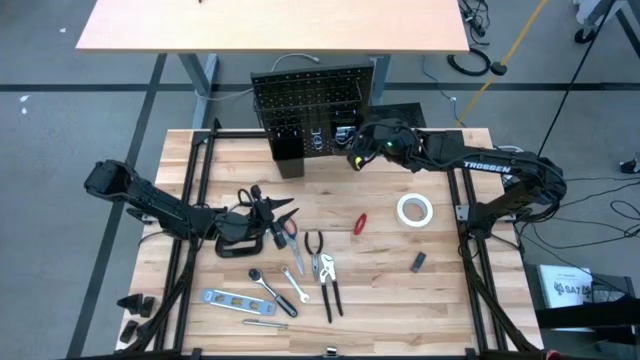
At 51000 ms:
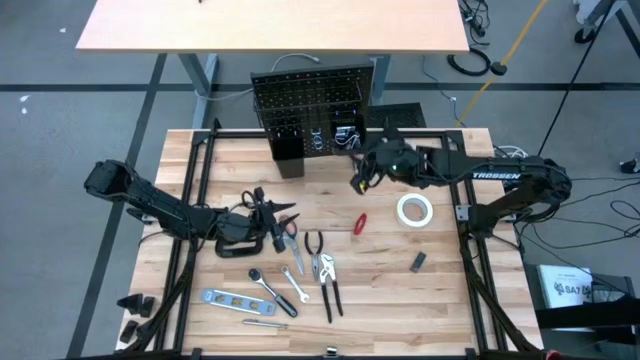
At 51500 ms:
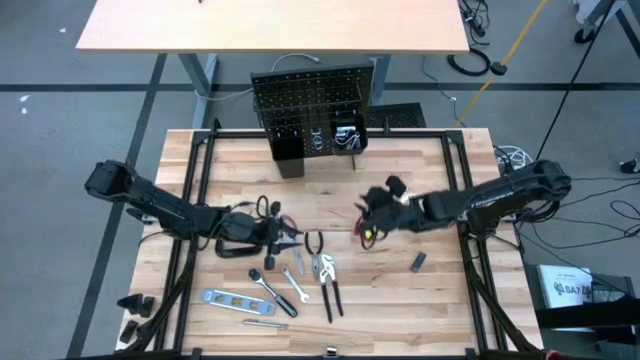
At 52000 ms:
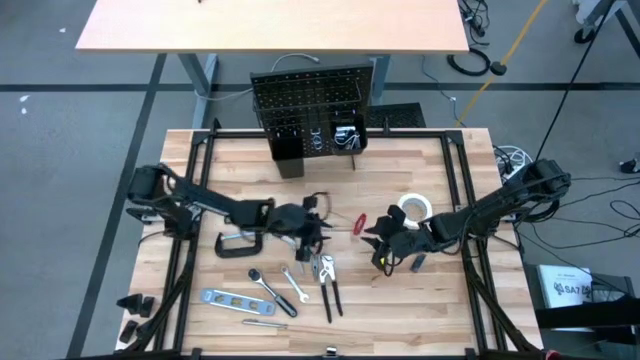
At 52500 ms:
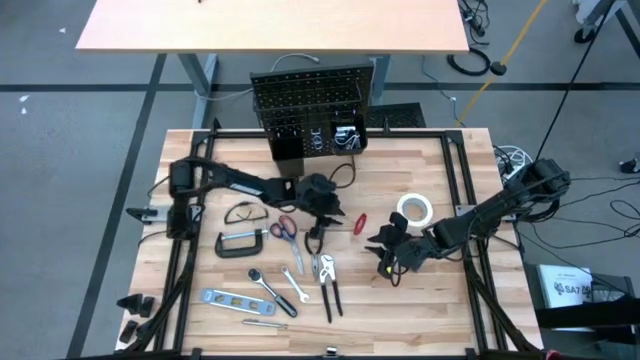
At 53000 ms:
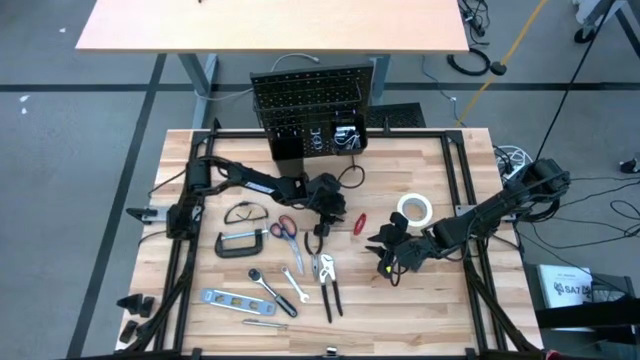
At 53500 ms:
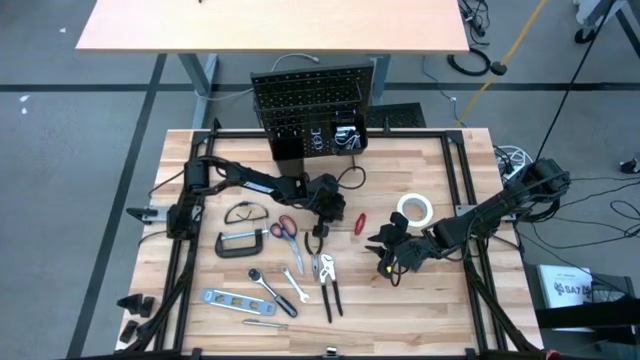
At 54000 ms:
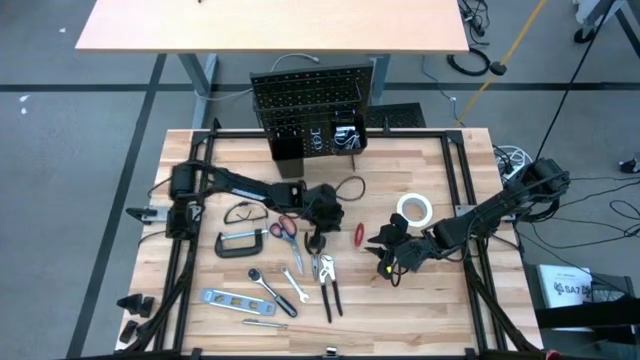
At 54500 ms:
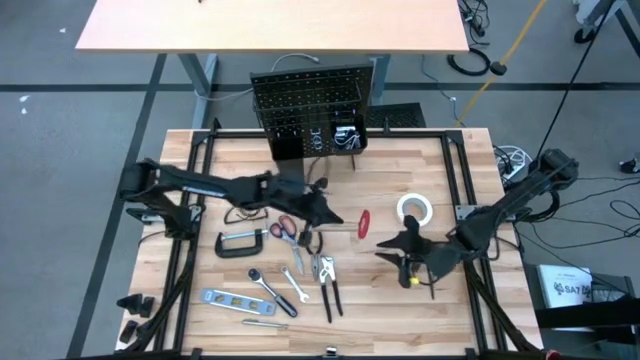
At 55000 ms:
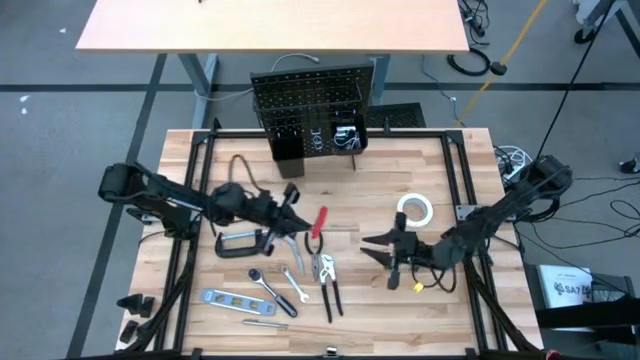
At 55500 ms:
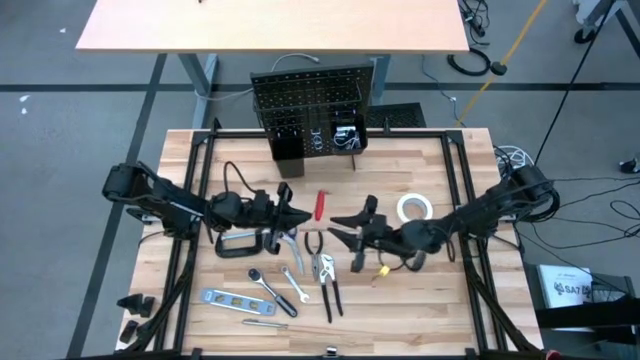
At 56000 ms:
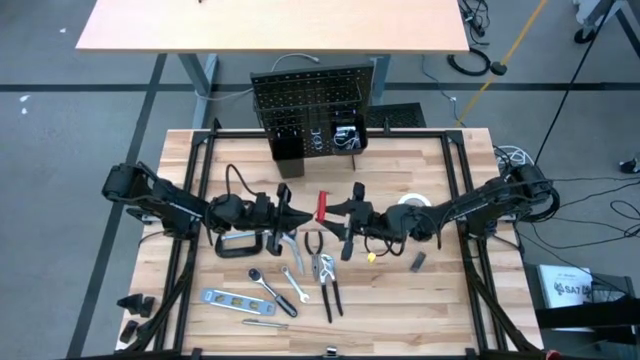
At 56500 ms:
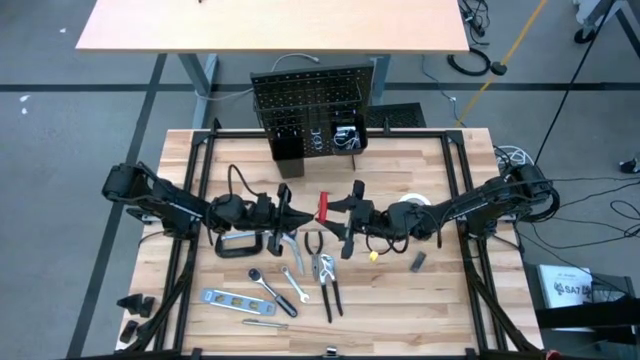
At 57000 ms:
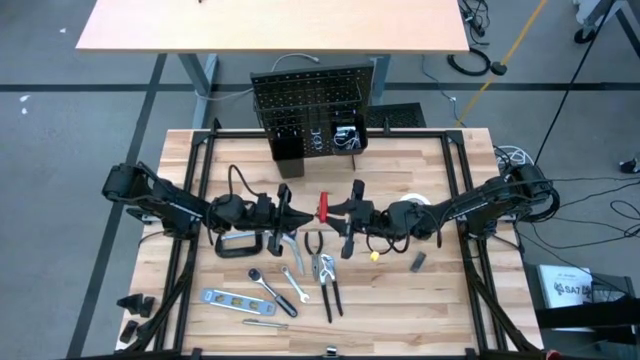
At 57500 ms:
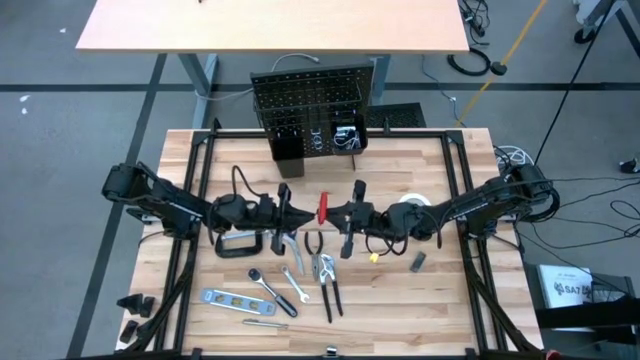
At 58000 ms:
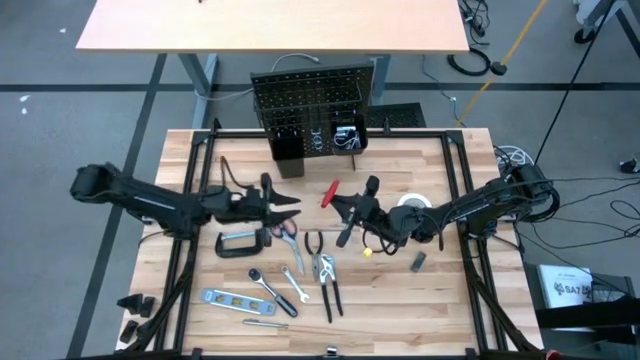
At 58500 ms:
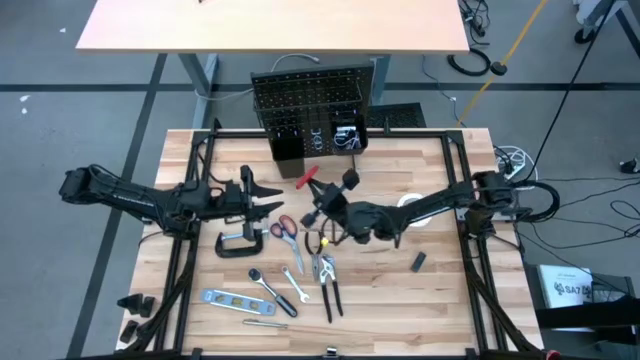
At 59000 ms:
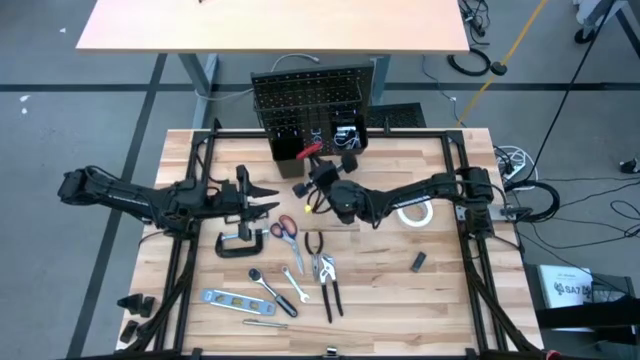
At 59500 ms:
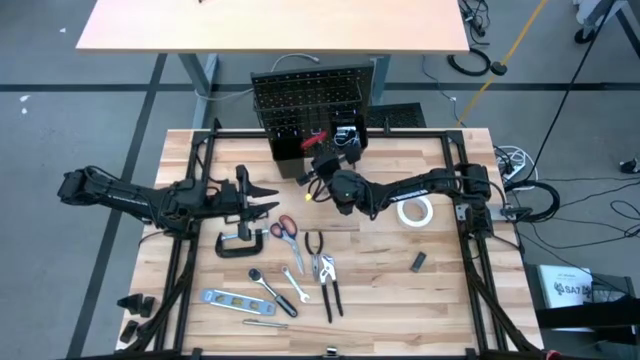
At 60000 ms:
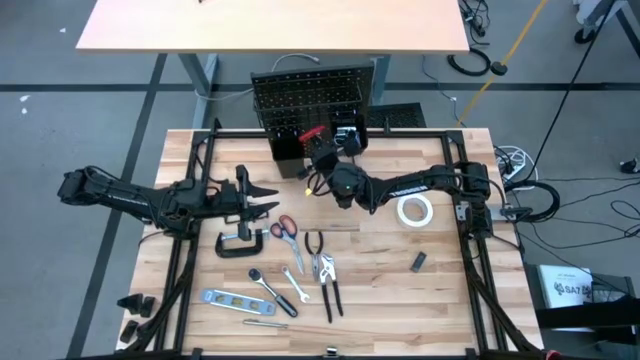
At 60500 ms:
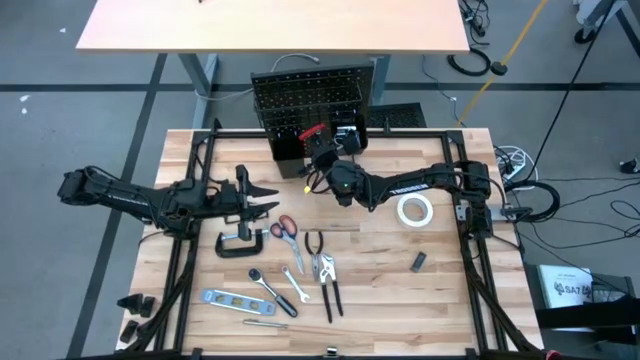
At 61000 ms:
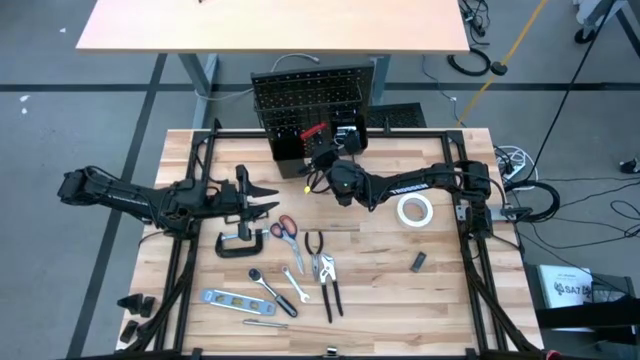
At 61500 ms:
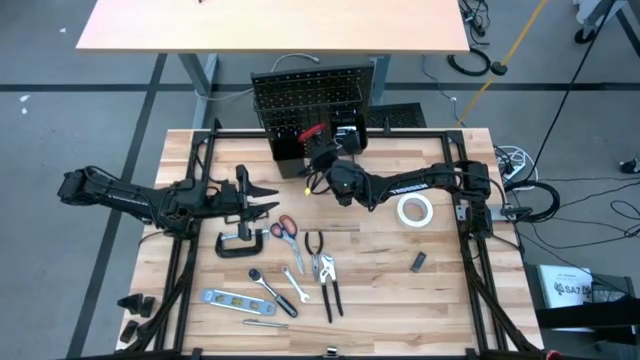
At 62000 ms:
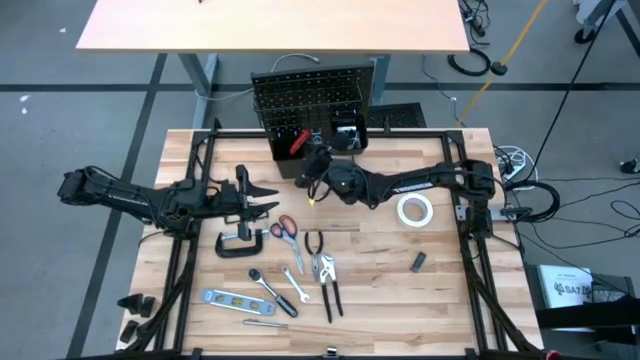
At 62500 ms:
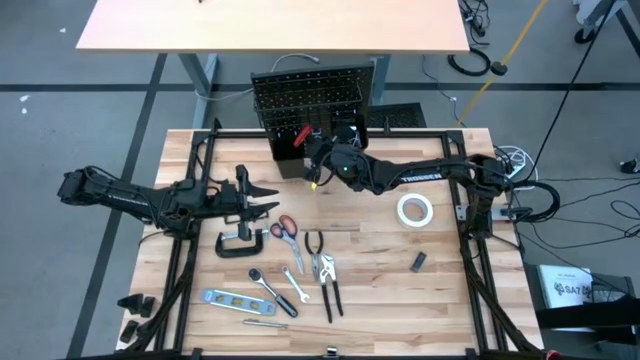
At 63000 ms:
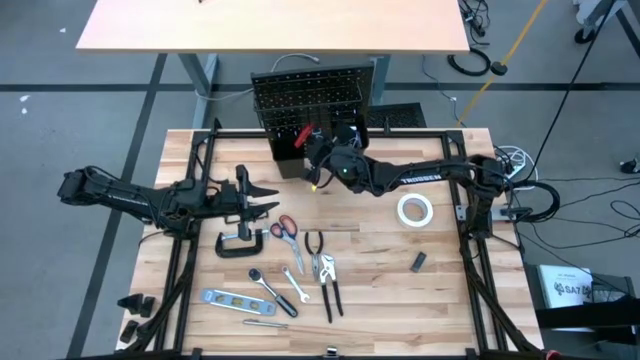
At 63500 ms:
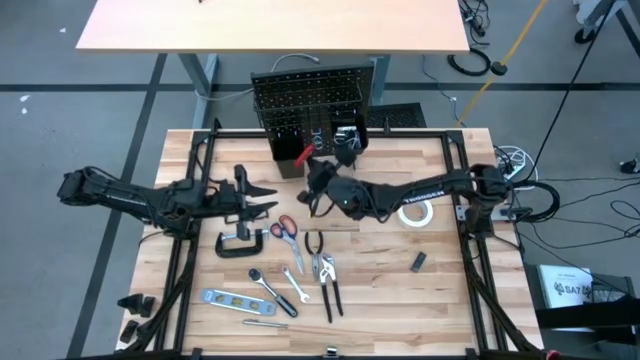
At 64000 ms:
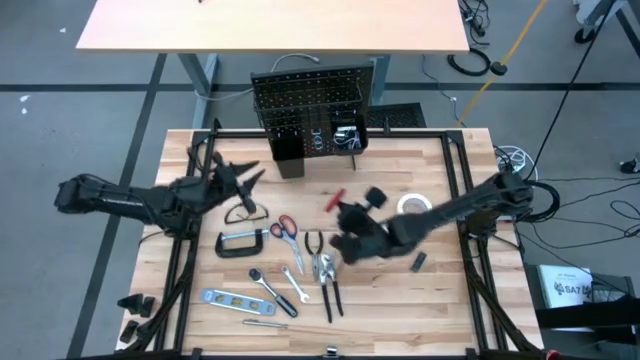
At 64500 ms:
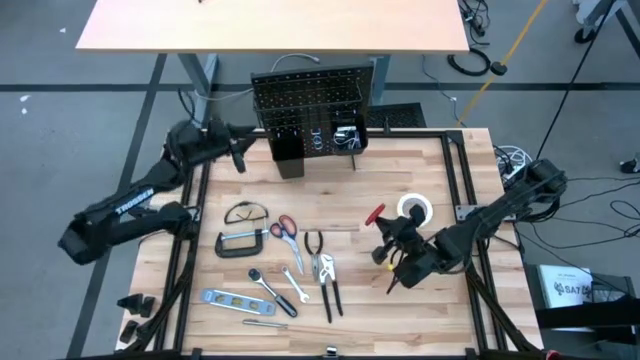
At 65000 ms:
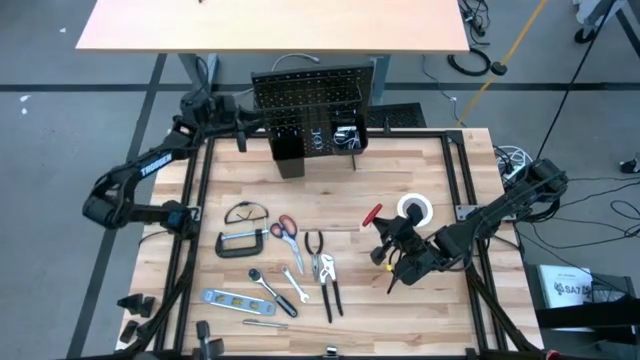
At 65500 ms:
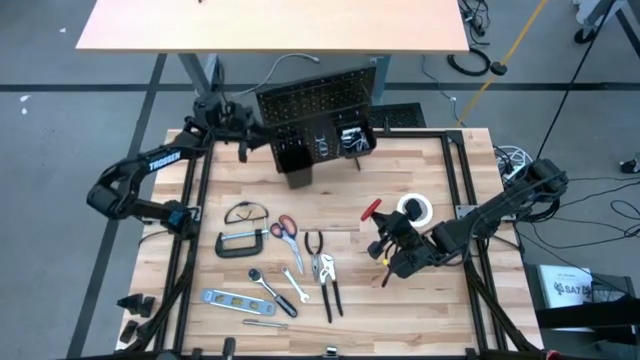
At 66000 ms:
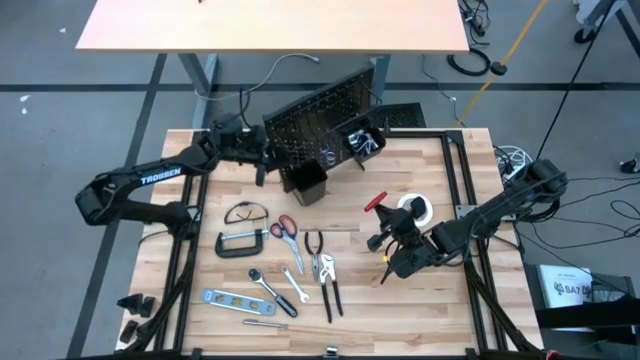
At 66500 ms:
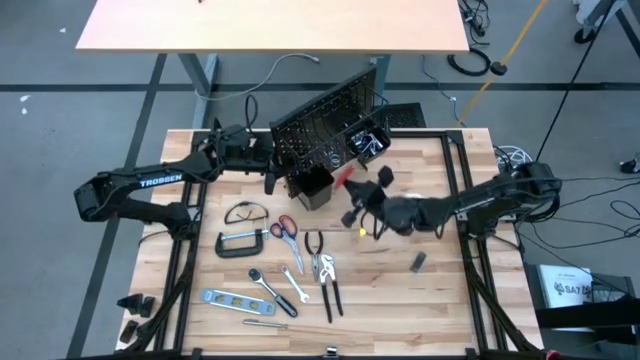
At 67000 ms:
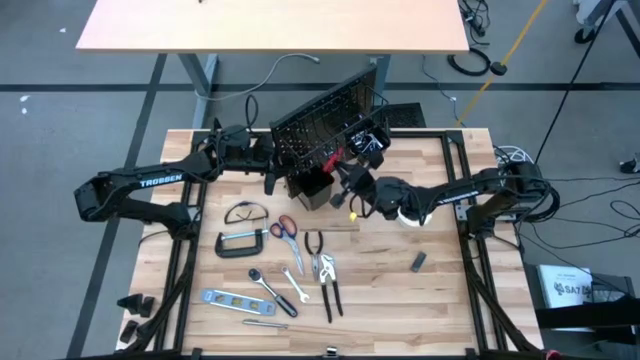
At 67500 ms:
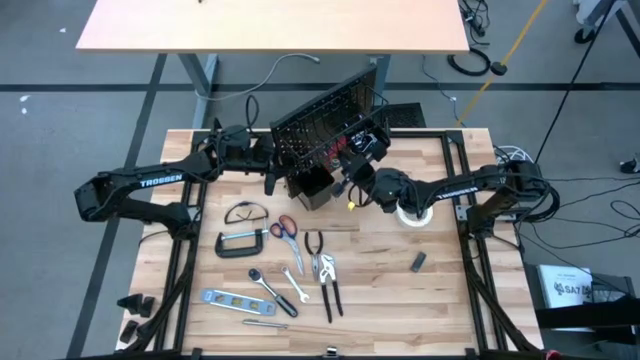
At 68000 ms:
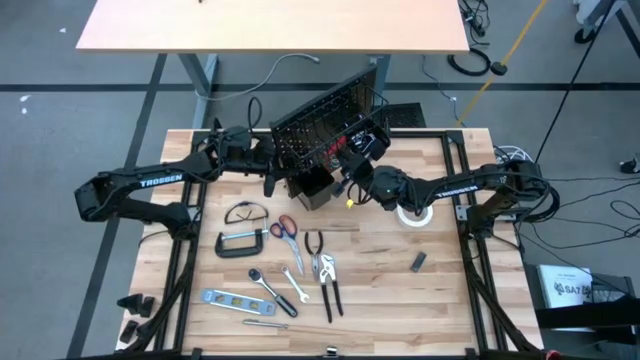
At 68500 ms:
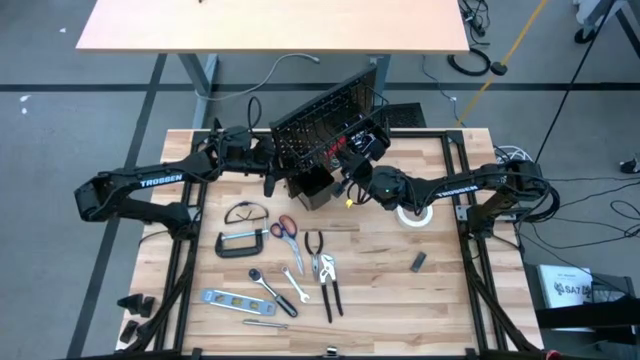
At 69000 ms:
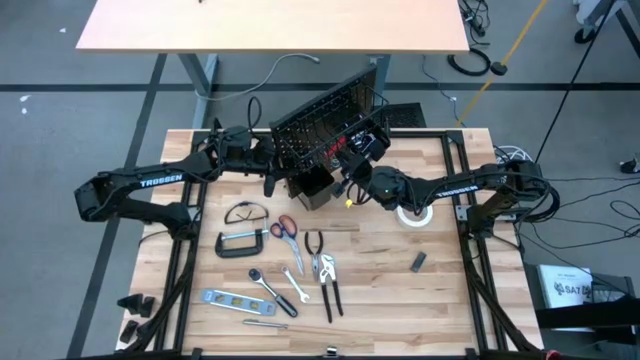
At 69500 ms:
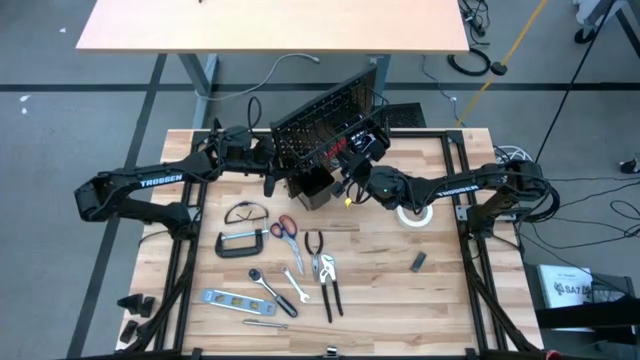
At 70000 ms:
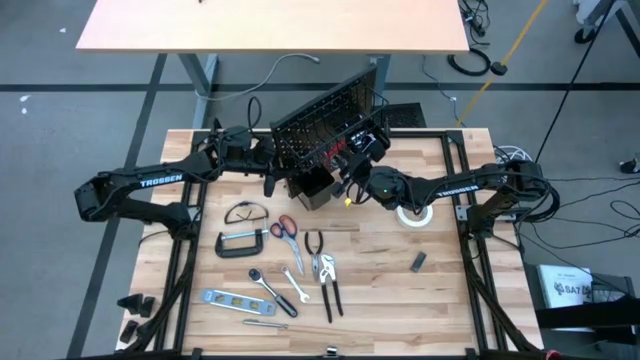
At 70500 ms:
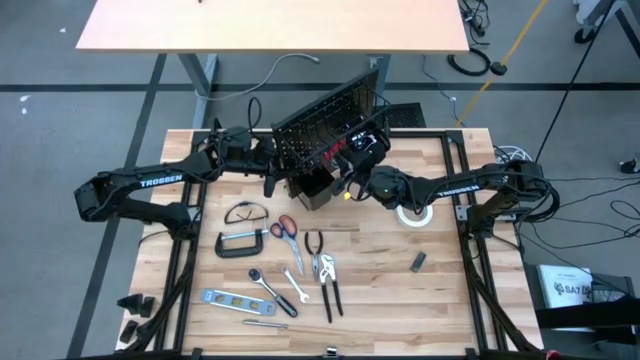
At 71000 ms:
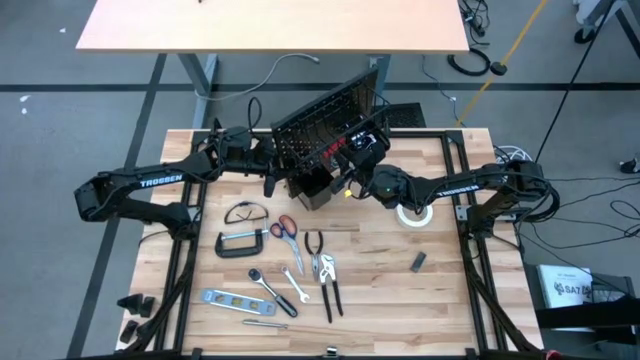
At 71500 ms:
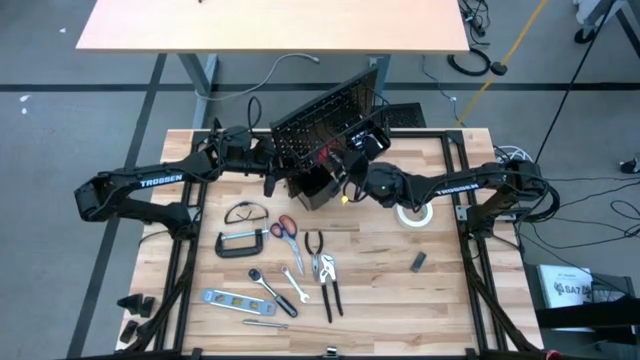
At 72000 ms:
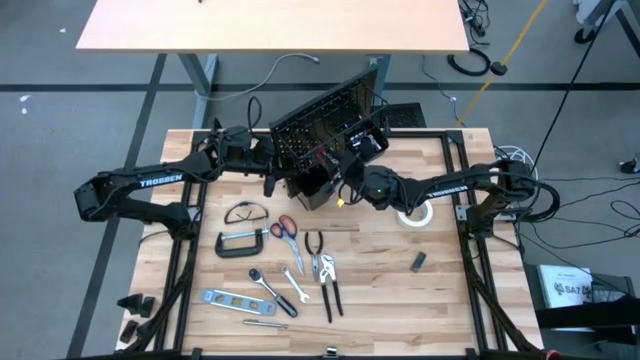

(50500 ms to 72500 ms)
Task: Hang tools onto peg board
Hang the allen wrench on the peg board

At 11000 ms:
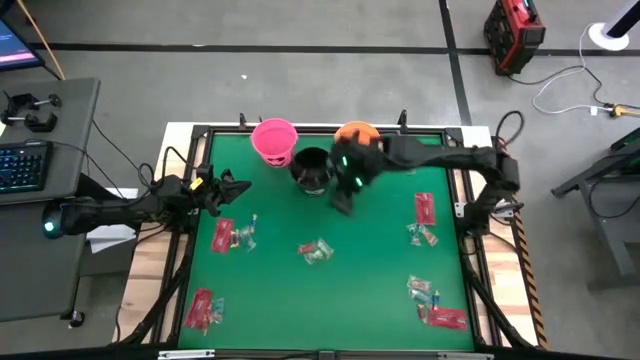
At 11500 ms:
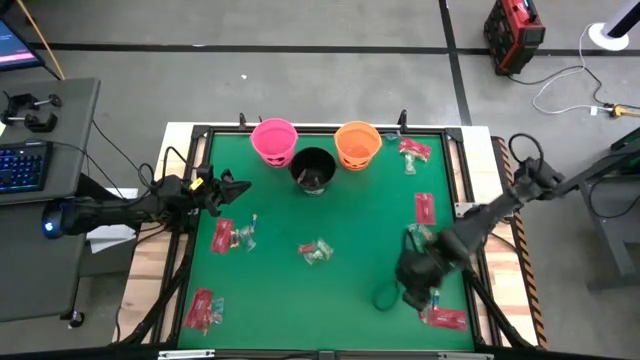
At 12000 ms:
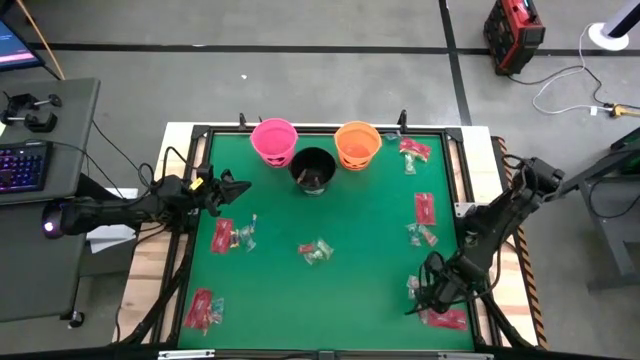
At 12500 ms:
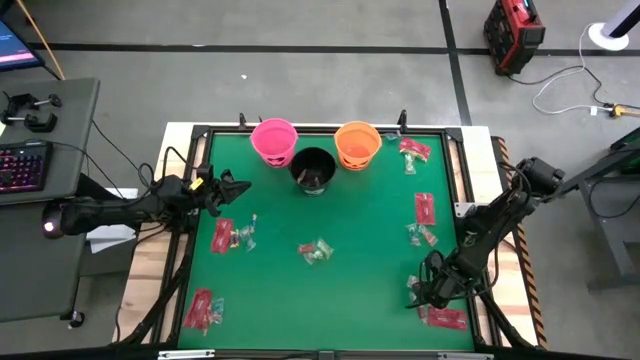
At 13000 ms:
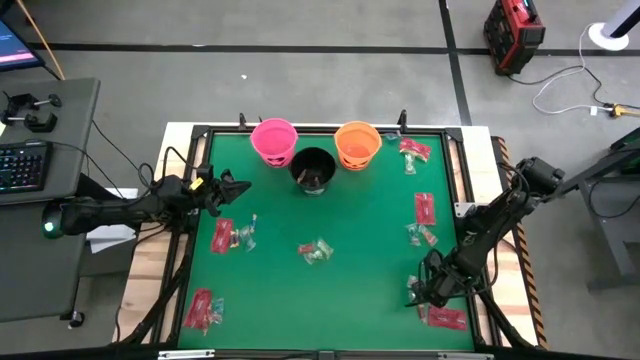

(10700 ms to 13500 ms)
Task: Sort candy by brand, put in halloween buckets
Put the blue candy into the black bucket
